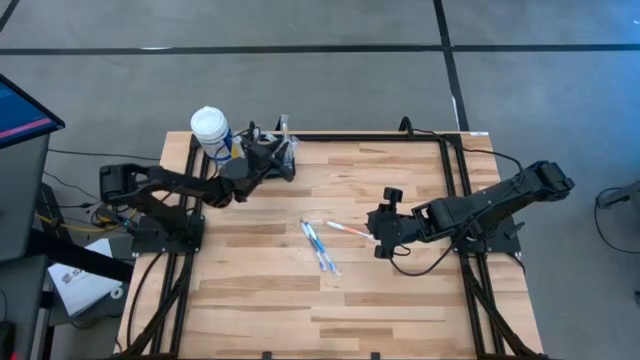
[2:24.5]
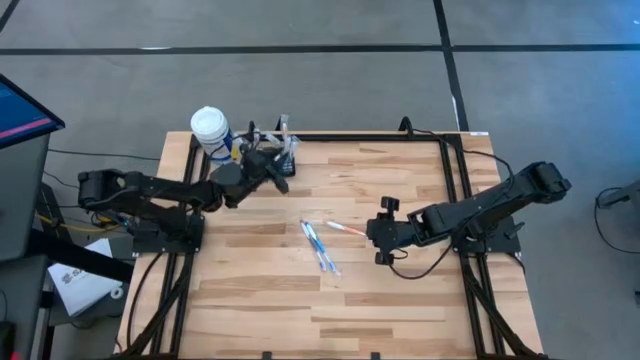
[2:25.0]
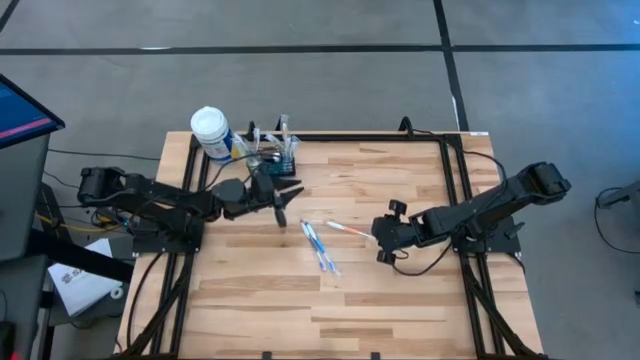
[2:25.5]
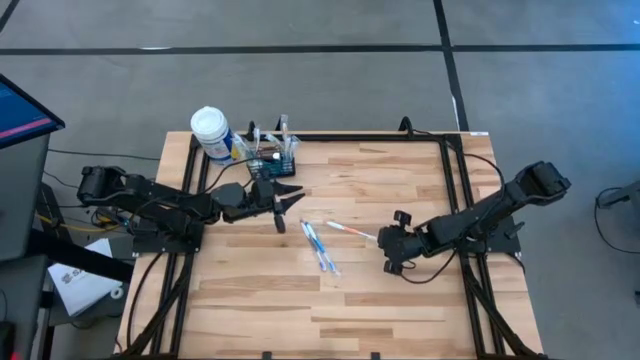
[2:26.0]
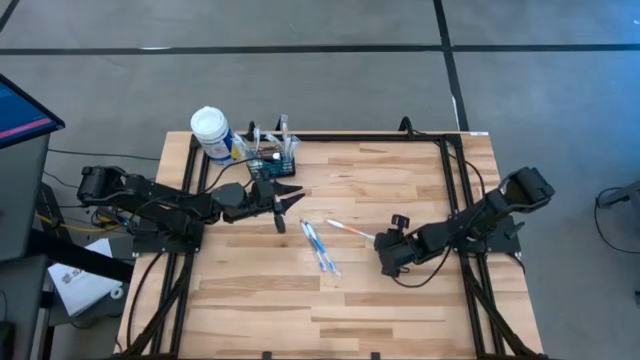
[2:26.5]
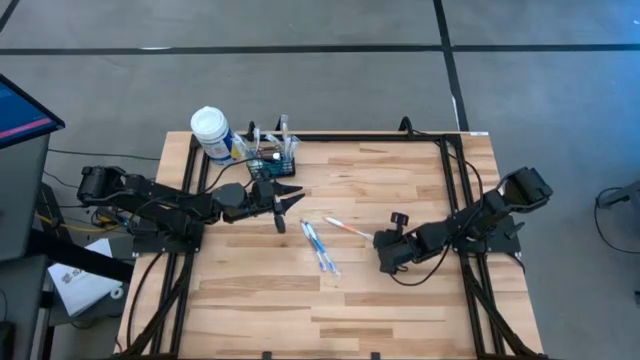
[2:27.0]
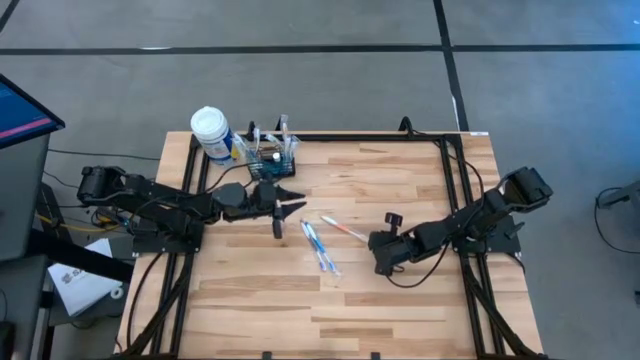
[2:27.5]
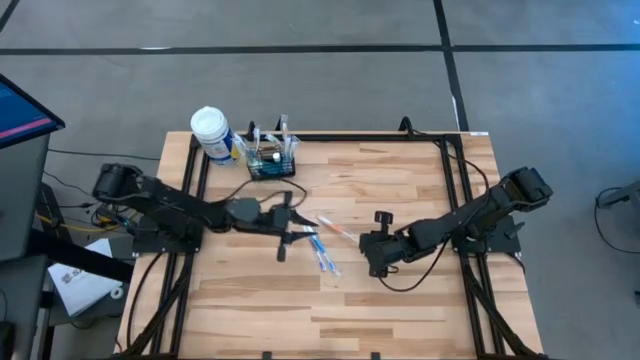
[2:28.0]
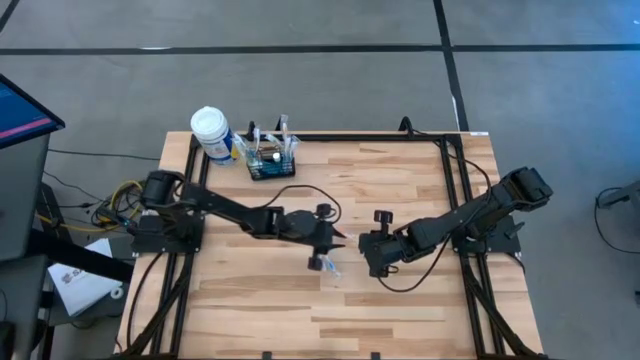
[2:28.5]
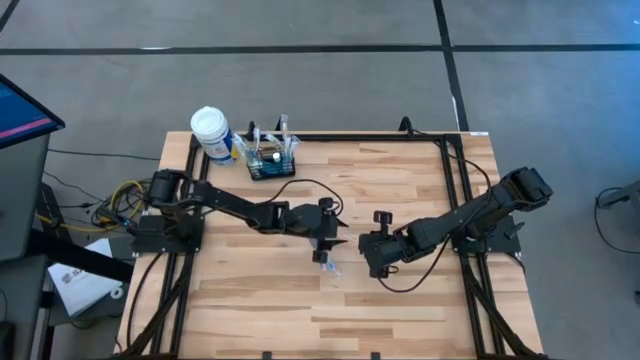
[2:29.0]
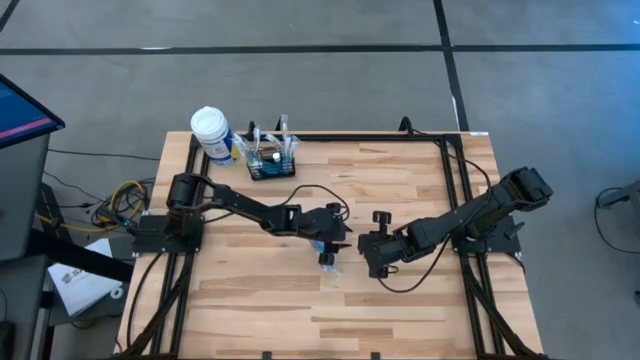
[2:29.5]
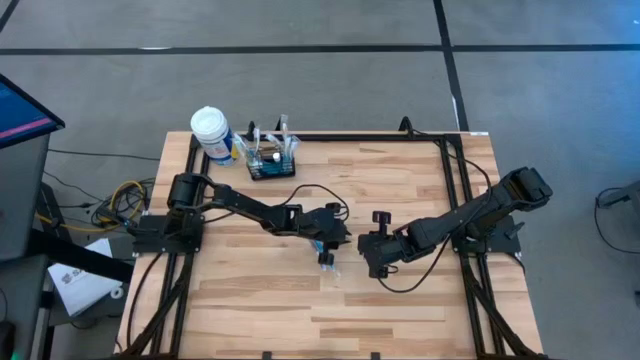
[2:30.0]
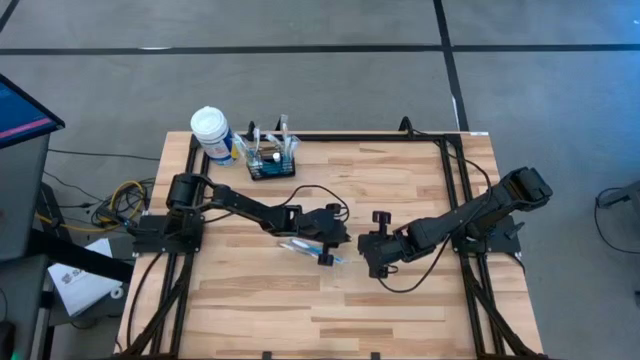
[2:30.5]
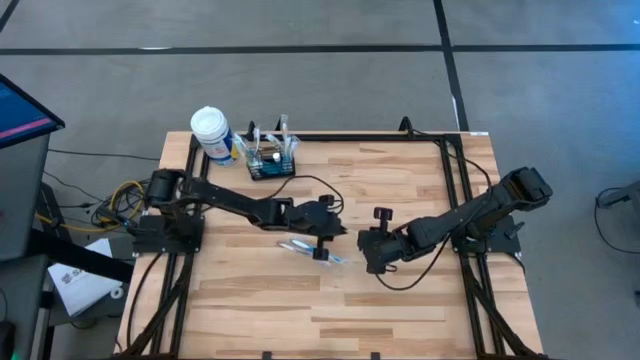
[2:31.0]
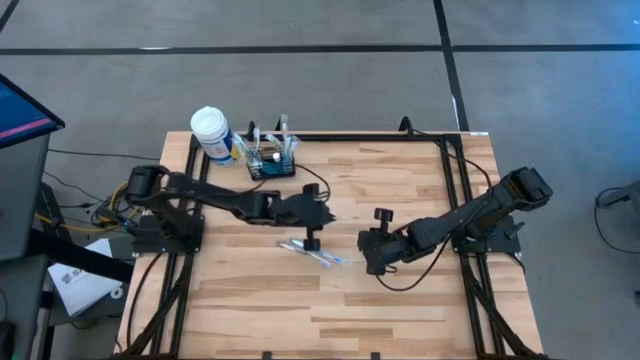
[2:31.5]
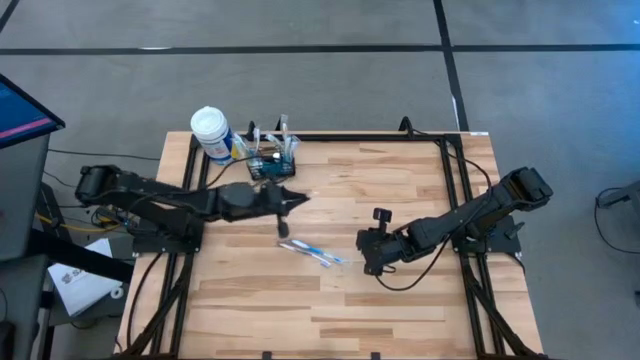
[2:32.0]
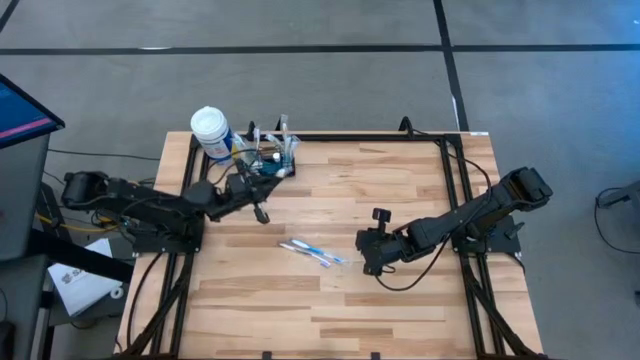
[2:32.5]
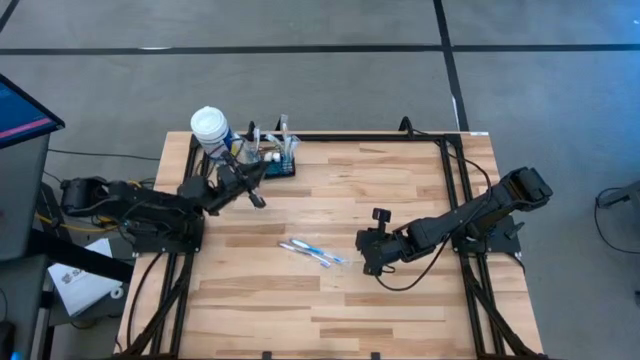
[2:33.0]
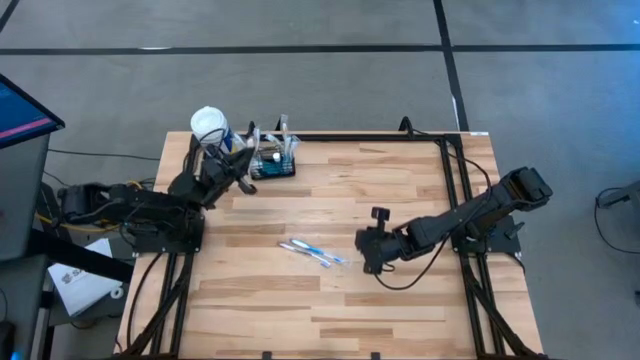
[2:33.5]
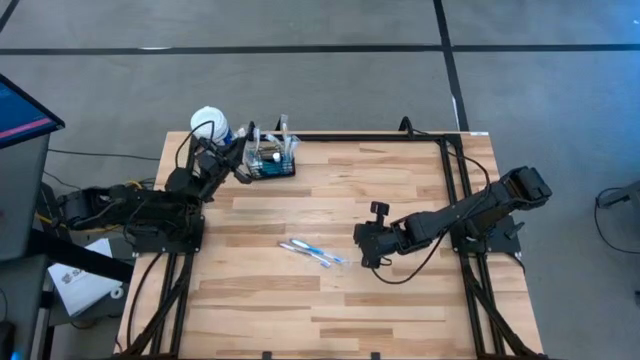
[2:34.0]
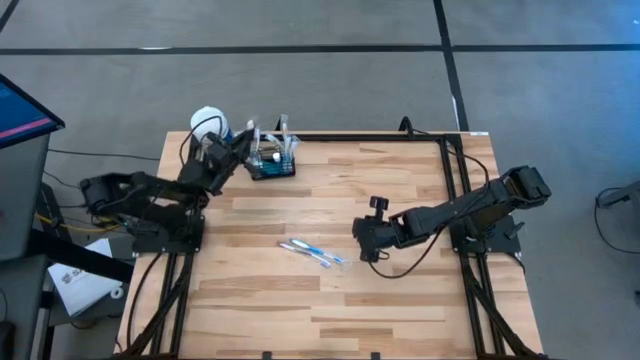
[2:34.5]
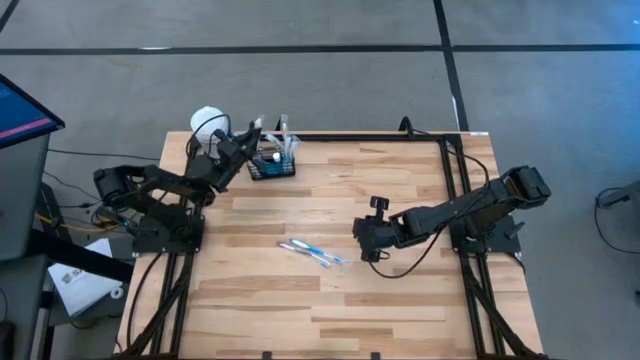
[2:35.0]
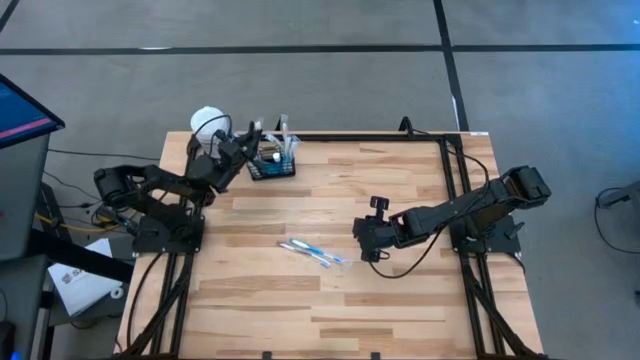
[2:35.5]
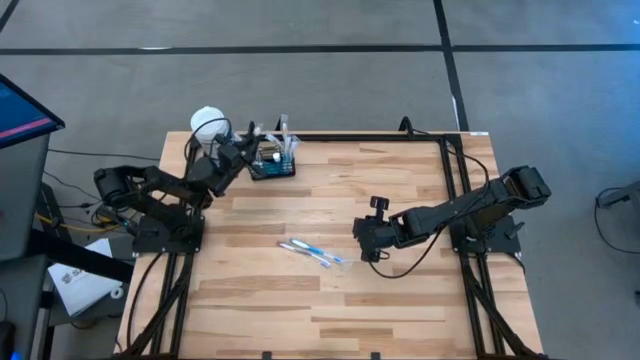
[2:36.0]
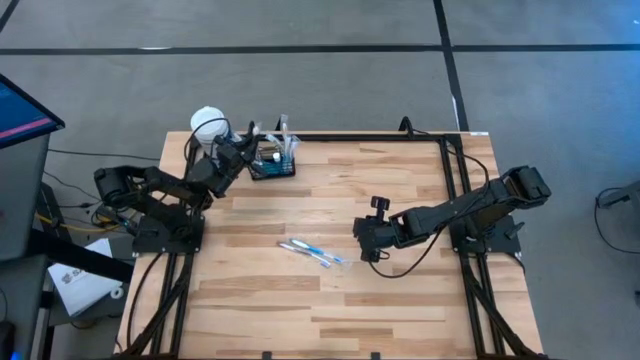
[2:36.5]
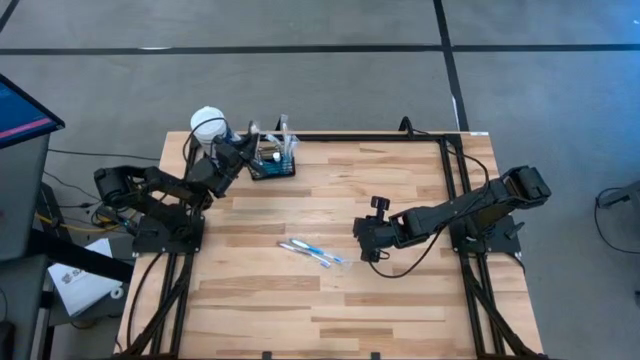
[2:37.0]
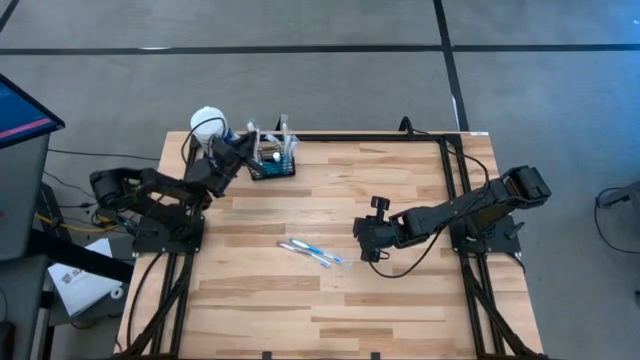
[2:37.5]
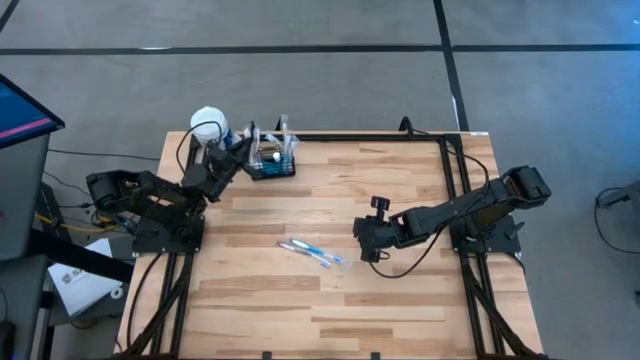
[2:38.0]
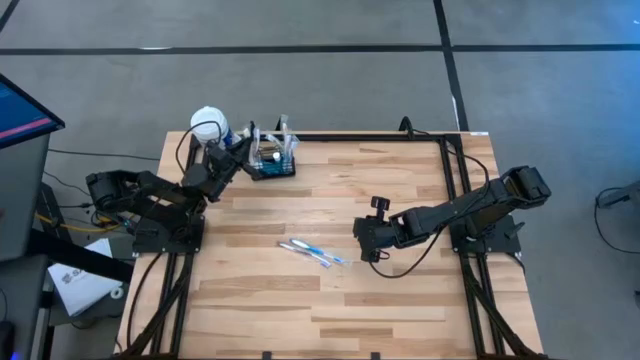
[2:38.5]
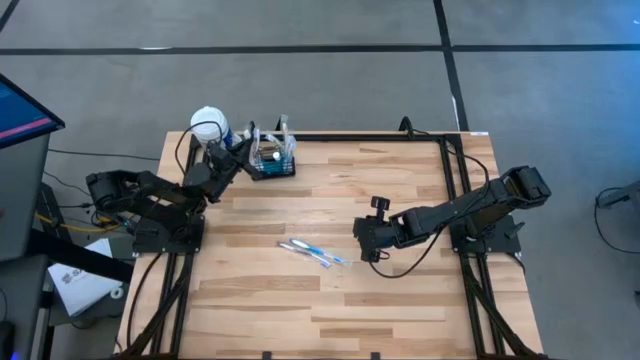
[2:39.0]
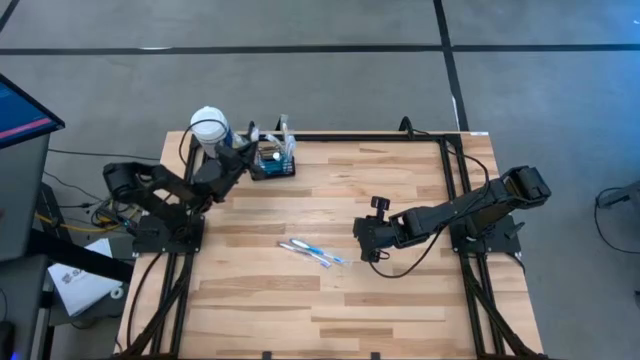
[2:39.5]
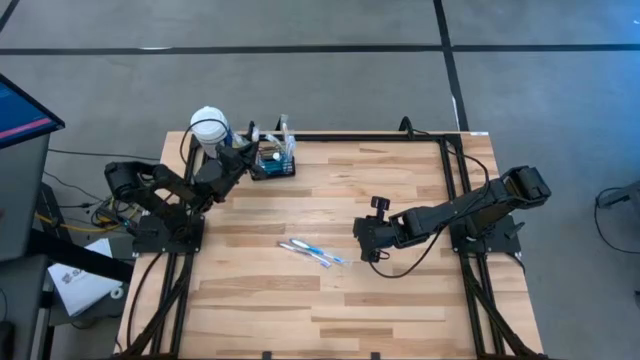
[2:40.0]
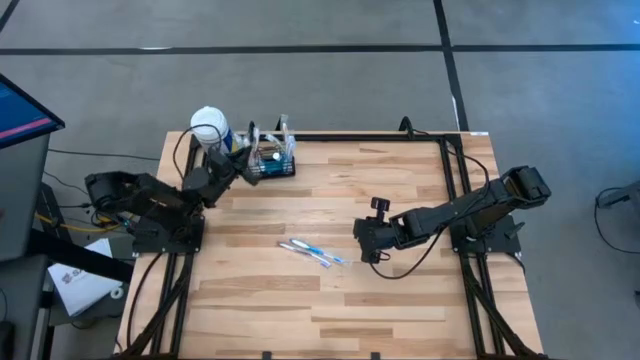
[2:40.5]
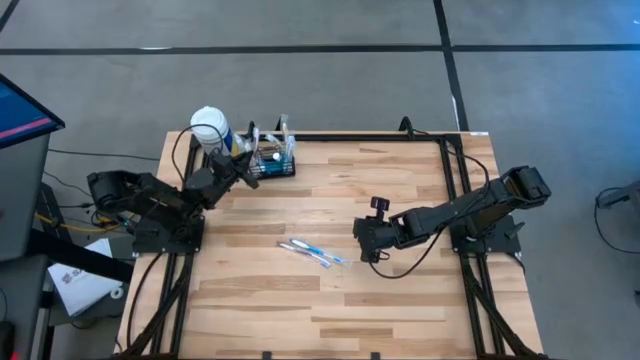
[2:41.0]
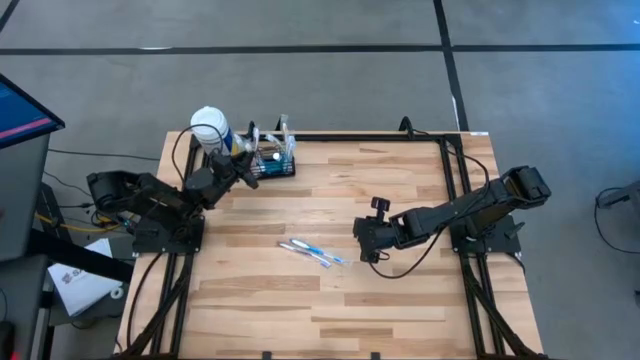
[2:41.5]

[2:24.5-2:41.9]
Task: Pick & Place toothbrushing station
Put the orange toothbrush into the black wire organizer

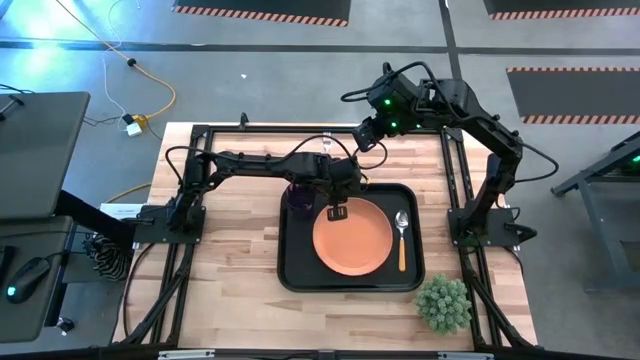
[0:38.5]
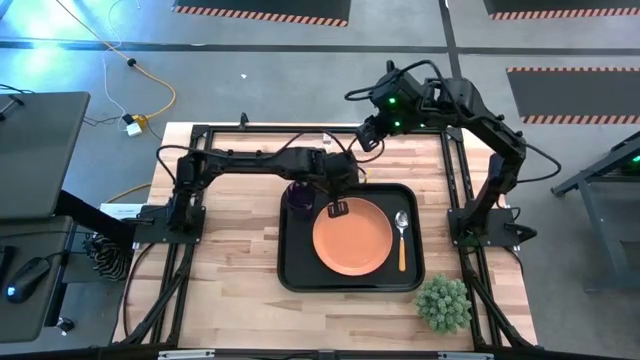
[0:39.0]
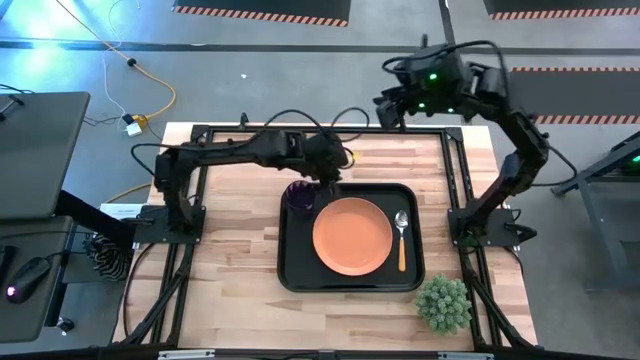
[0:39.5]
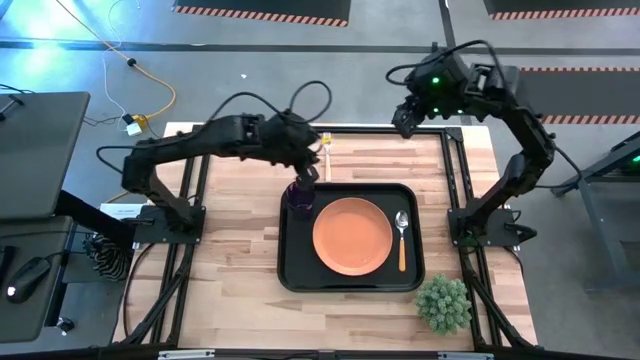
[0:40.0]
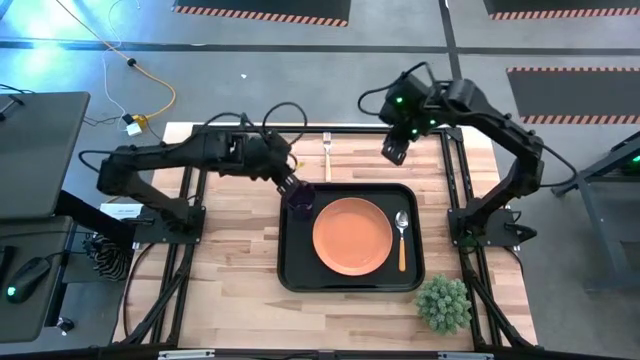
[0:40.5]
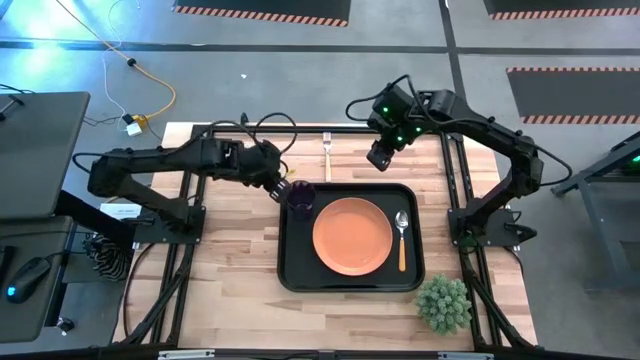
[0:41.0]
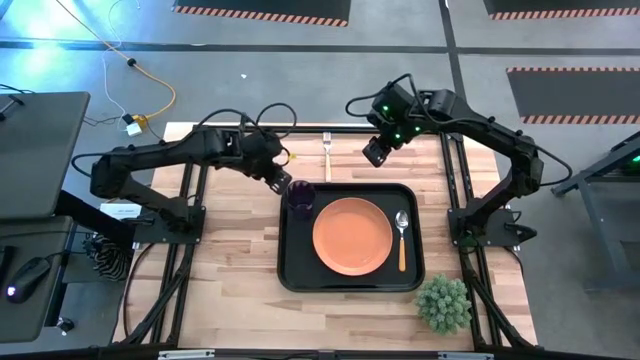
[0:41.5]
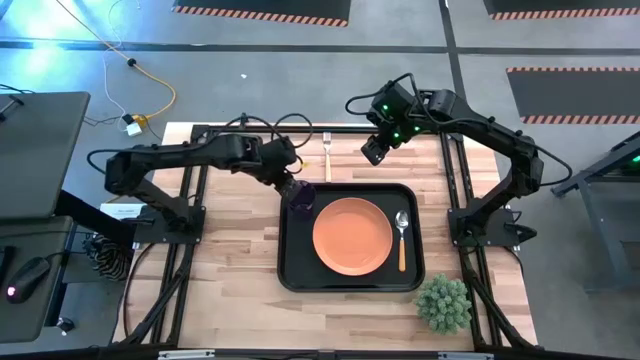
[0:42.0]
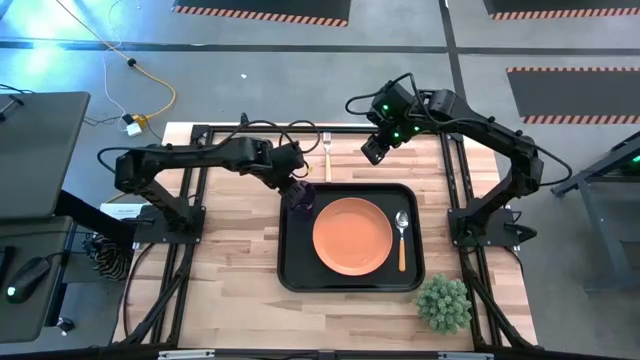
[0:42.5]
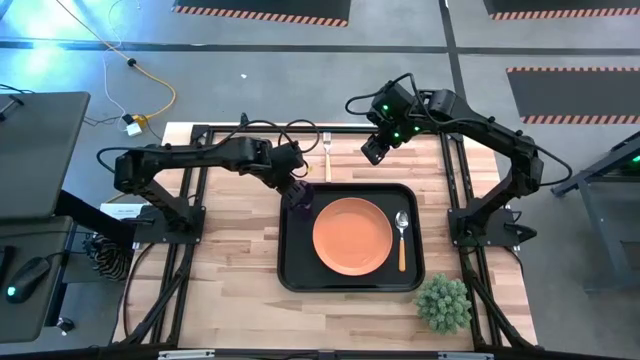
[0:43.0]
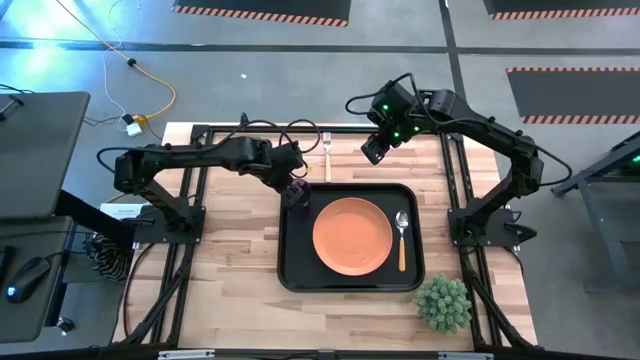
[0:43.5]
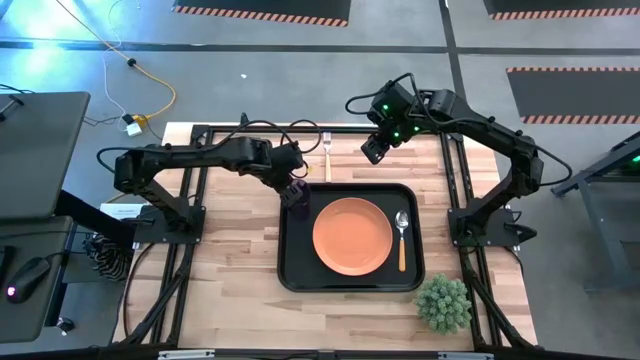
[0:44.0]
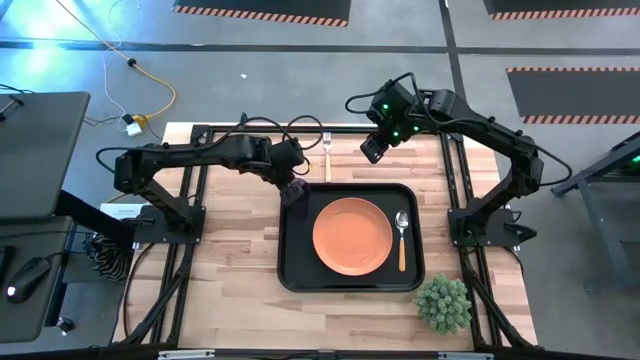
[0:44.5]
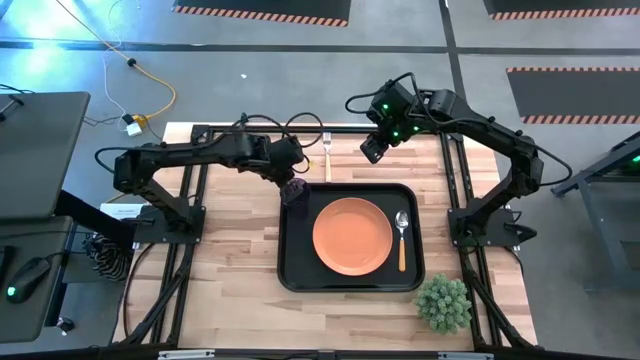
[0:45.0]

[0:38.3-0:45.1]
Task: Pick and place plate/cup/fork/spoon on tray
Adjust the purple cup
